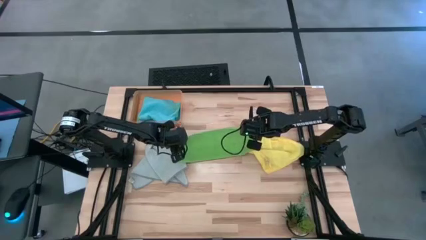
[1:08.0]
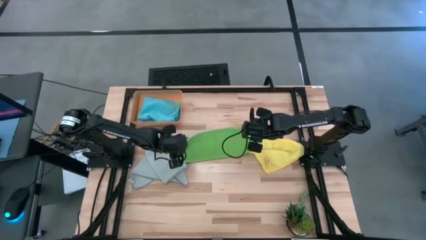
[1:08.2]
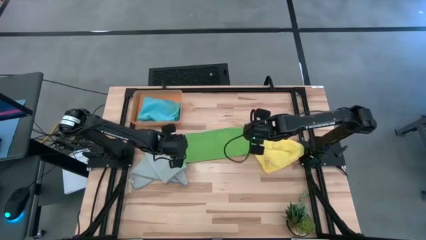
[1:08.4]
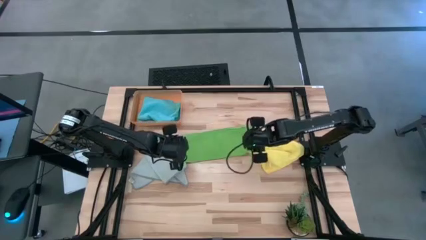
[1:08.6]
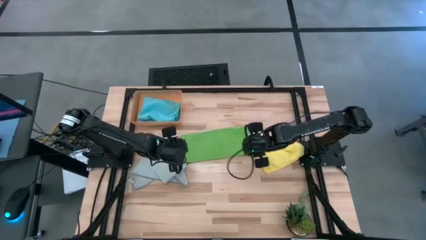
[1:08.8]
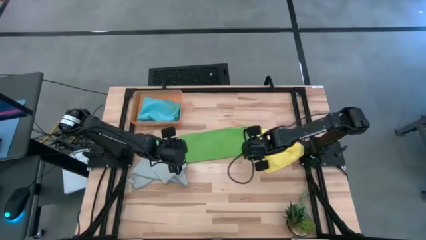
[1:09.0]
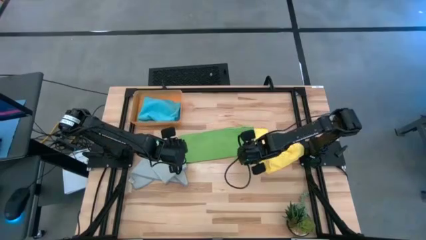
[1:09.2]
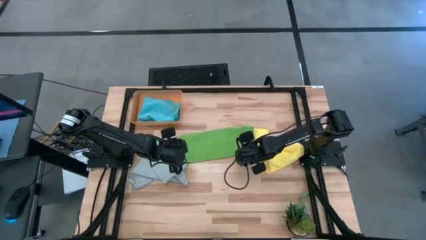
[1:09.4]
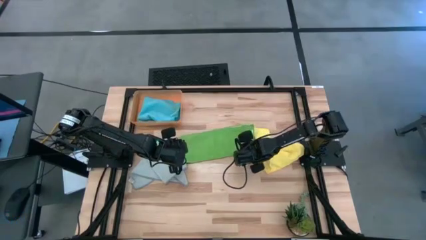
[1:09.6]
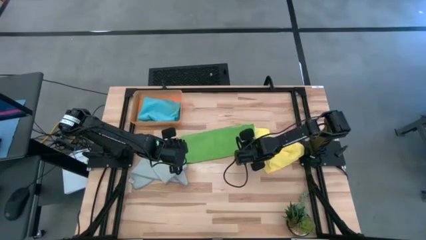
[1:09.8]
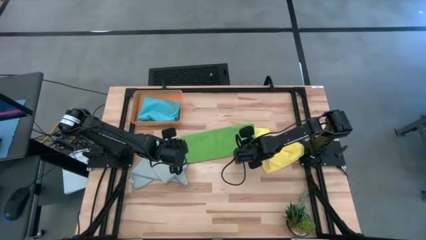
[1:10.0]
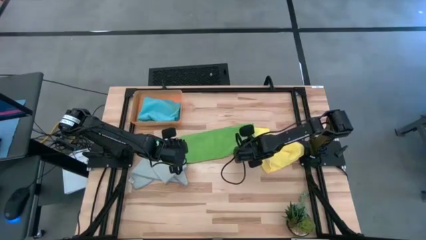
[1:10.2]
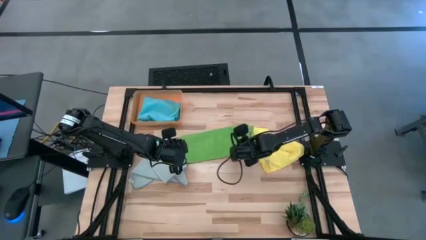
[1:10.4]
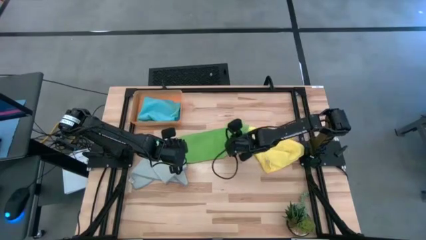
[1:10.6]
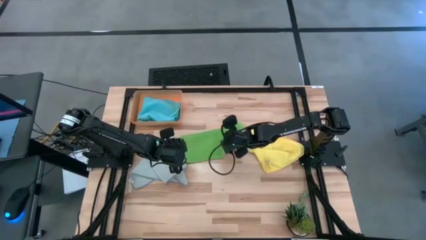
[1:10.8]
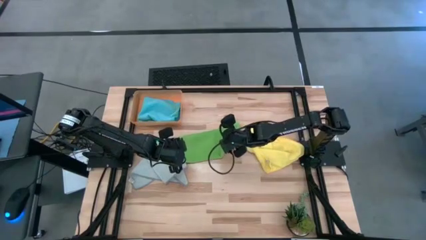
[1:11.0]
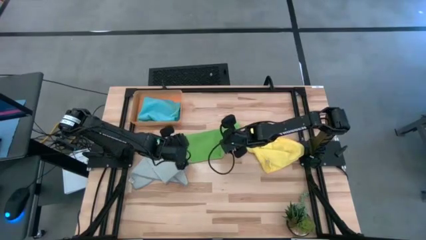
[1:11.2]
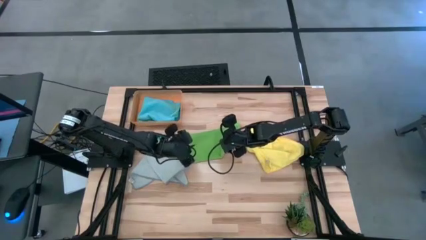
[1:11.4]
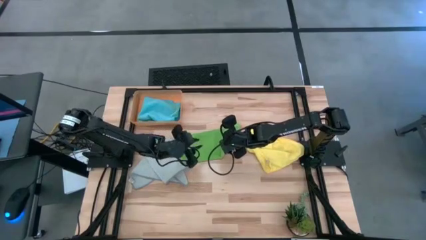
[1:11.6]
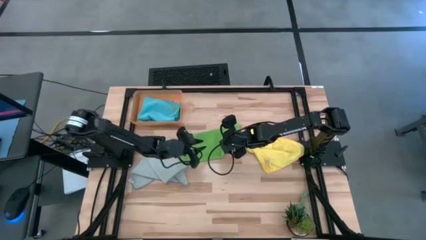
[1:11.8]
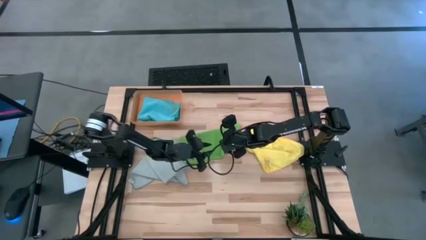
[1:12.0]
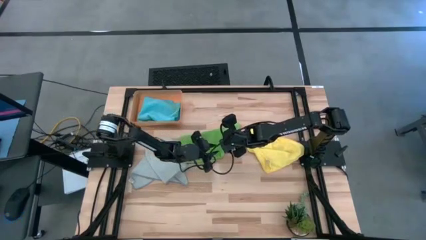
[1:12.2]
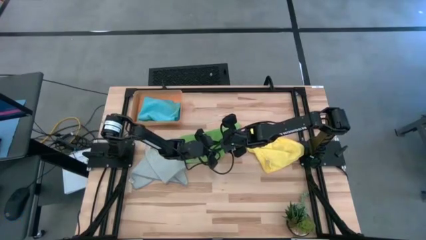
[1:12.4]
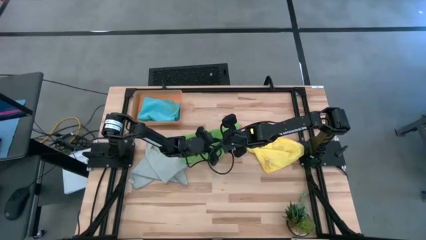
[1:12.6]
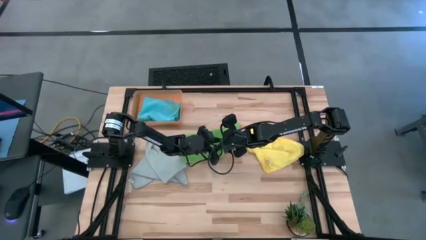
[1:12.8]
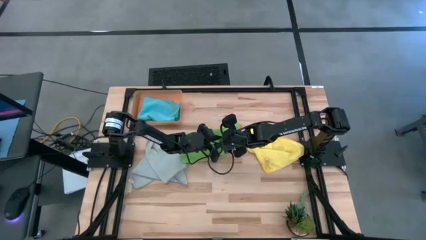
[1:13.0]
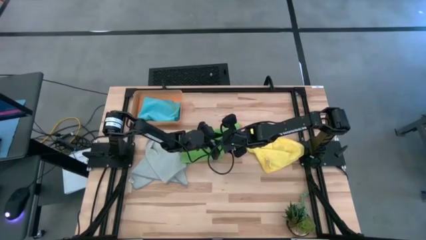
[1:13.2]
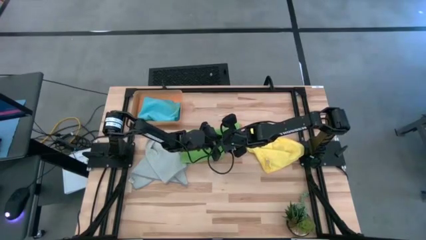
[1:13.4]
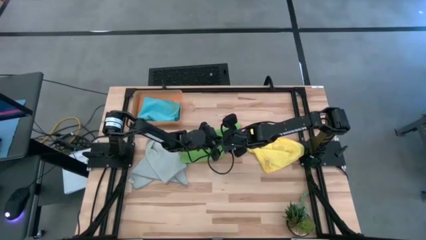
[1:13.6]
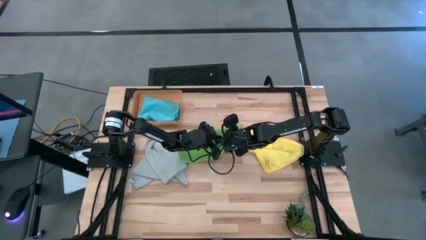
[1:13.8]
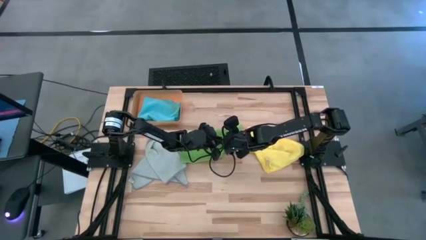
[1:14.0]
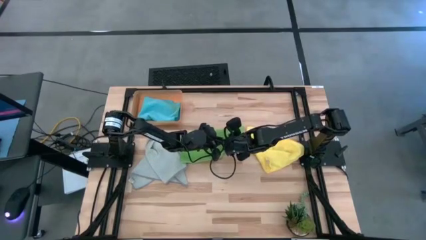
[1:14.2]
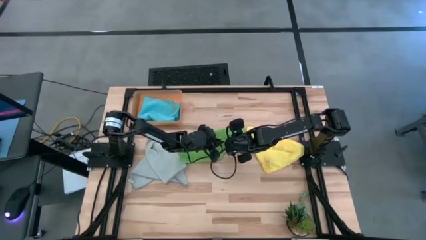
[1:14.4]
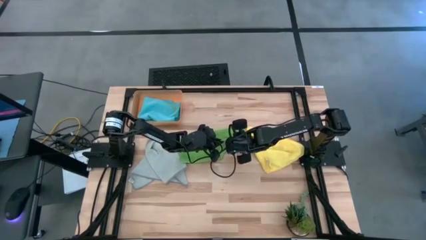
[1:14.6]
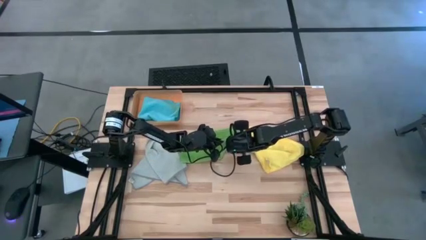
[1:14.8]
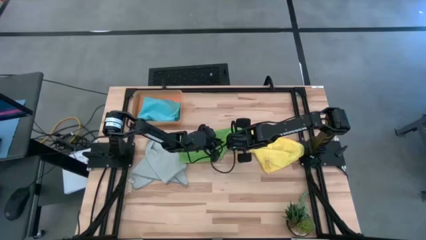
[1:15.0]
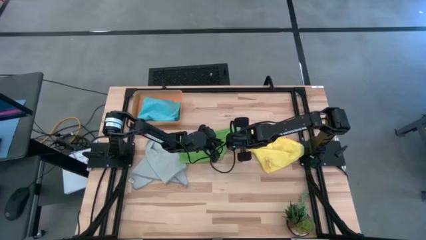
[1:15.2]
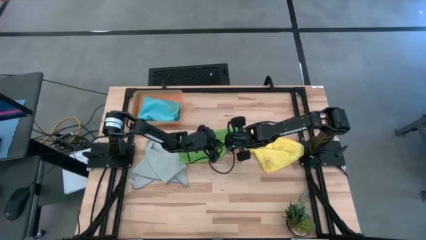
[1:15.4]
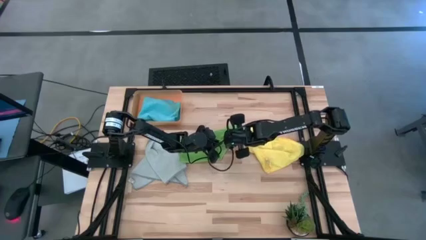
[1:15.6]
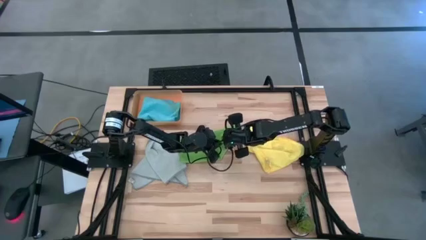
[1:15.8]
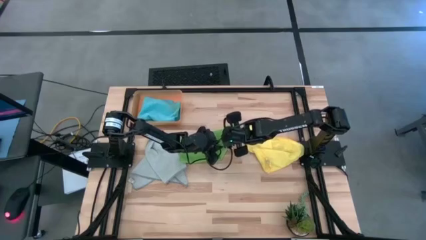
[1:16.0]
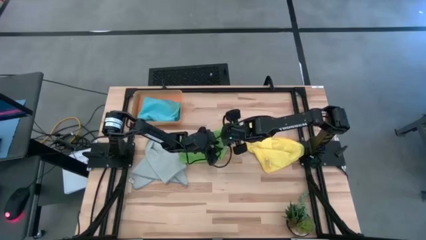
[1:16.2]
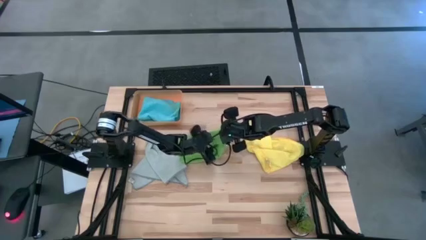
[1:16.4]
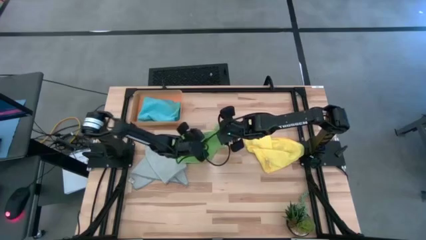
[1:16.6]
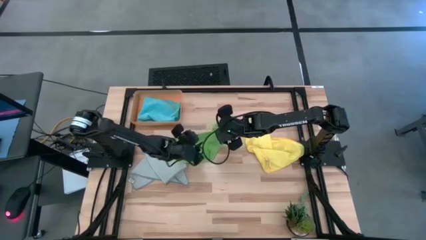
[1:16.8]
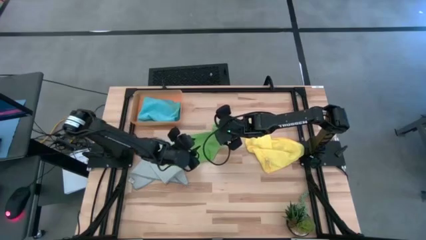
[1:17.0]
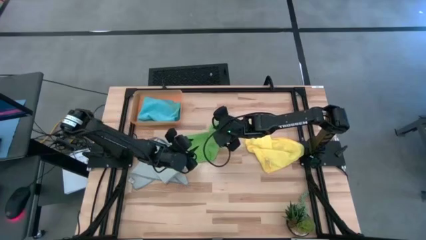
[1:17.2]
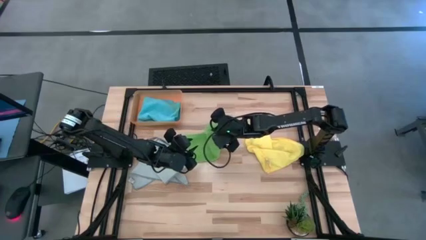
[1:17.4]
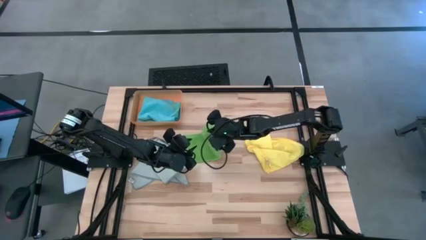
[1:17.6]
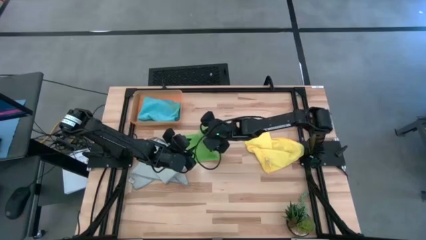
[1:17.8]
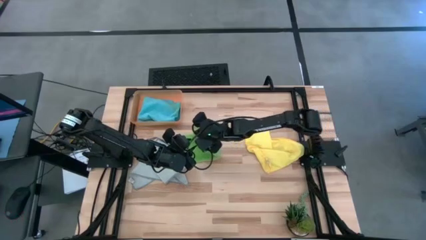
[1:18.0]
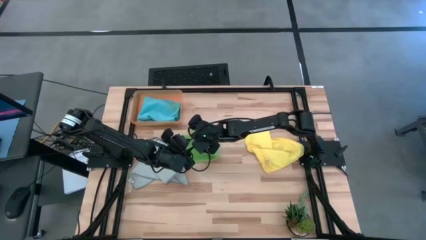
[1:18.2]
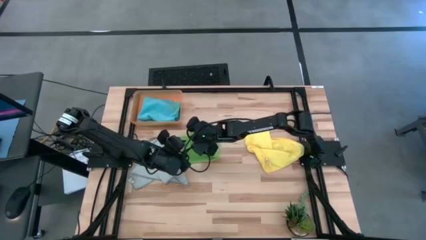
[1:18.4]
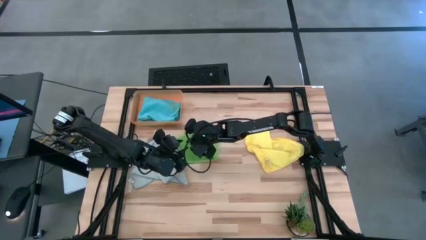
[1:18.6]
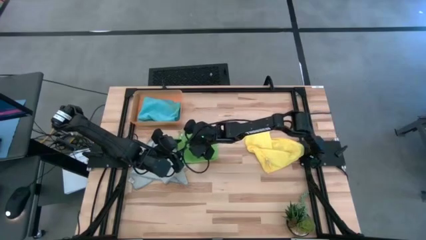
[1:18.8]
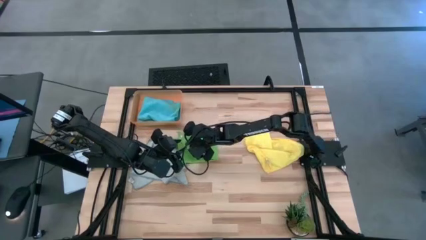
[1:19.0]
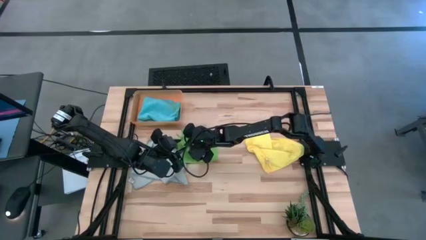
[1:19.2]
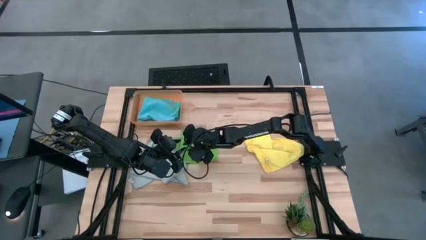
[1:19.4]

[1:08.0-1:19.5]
Task: Fold microfiber towels
Fold the green microfiber cloth

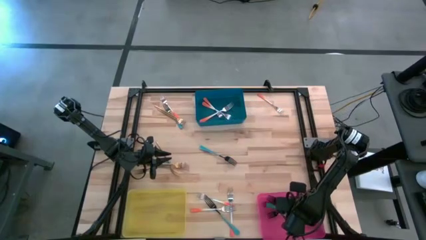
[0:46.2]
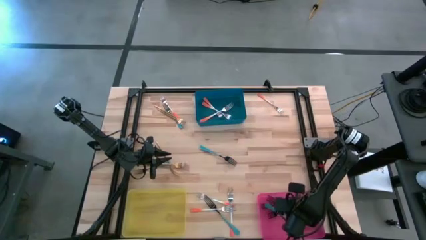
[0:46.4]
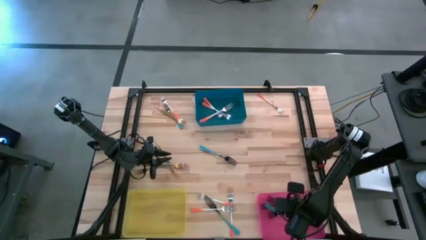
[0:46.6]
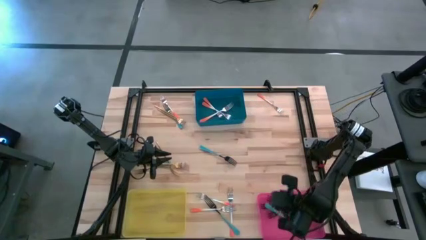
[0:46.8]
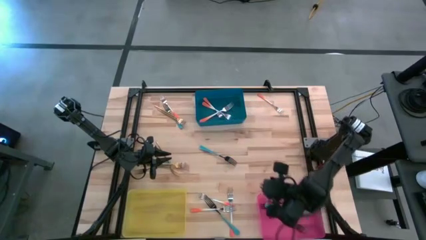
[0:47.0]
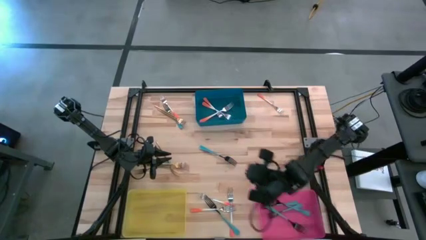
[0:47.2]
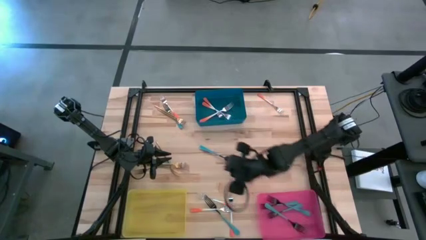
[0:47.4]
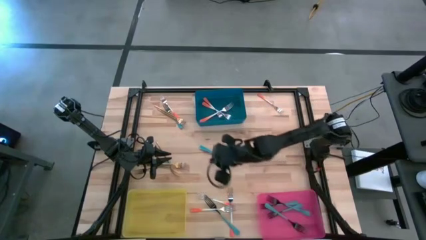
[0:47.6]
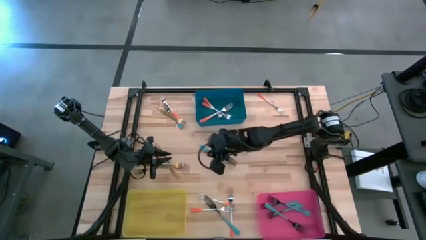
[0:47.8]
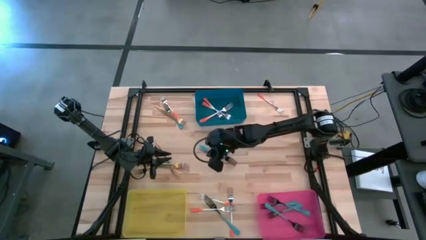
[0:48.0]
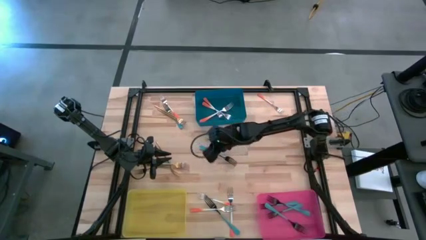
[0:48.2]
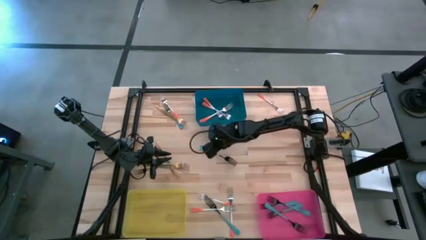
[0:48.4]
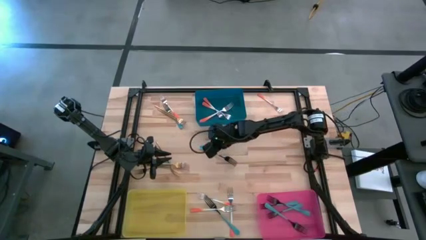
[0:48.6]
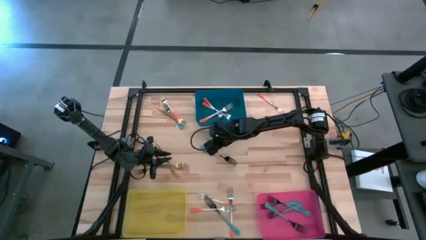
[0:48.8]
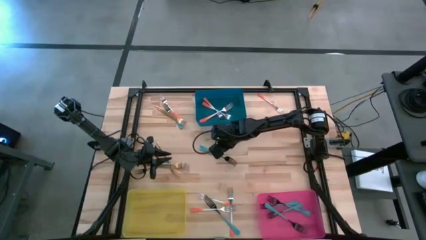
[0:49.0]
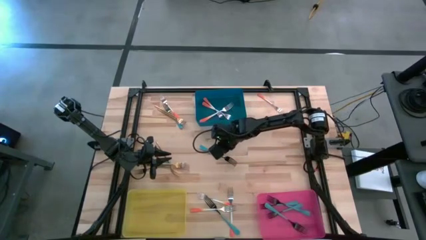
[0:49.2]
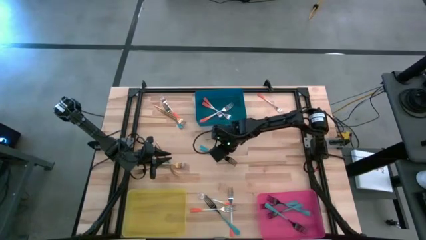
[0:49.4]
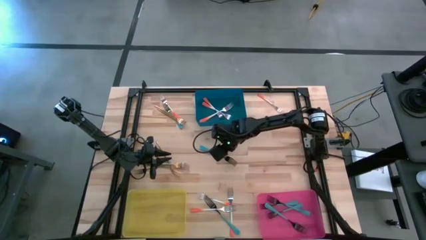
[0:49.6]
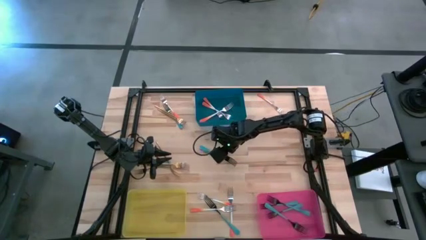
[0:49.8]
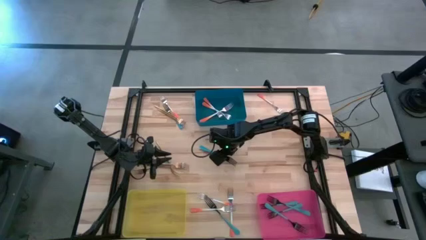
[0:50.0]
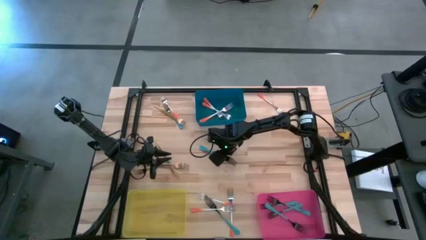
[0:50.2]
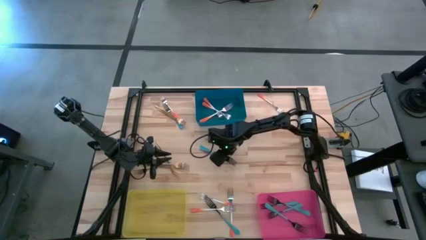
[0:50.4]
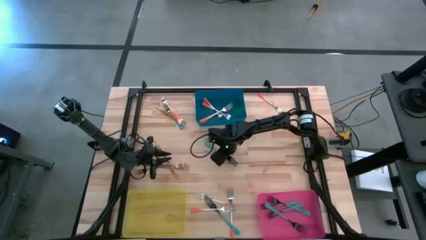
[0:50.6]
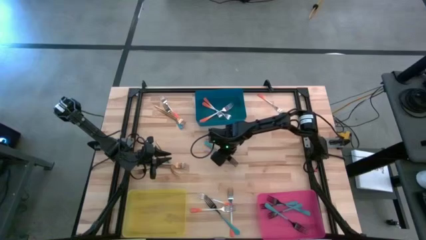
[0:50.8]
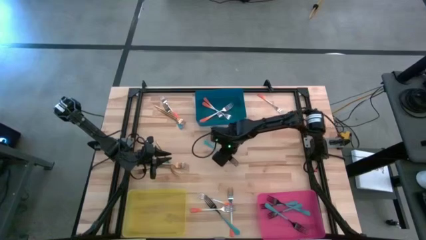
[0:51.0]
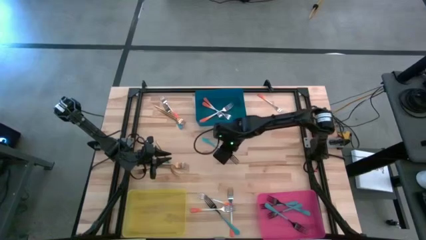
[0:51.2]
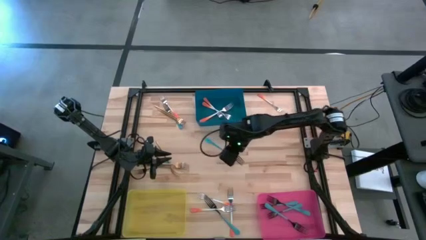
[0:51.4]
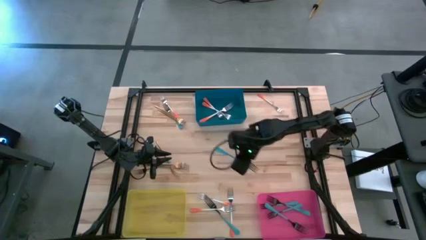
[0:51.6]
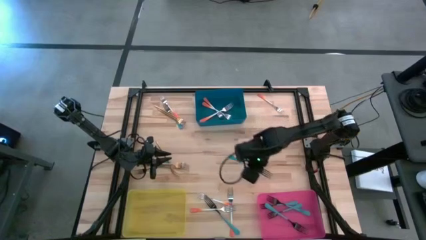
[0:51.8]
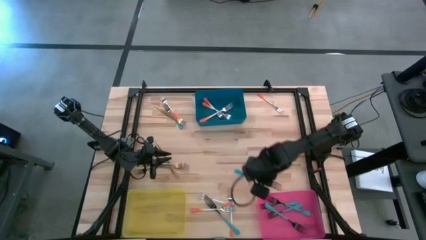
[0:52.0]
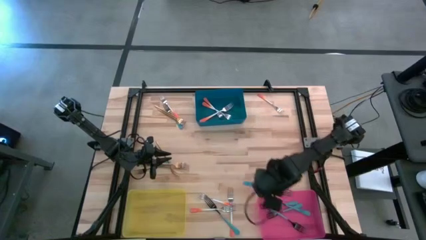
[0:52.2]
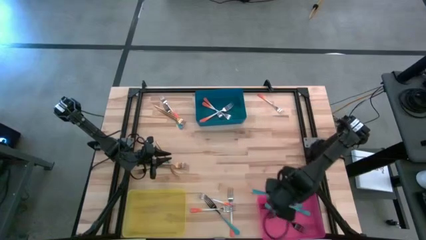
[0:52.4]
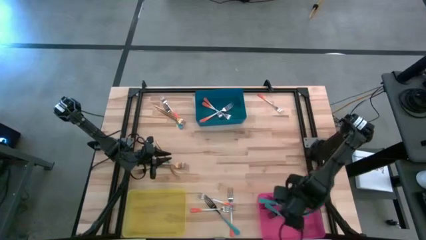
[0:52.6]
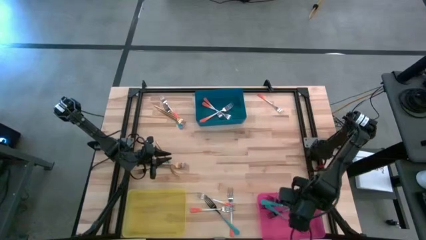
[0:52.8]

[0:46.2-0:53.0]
Task: Sort silverware by color (type)
Put the blue fork into the pink bin
